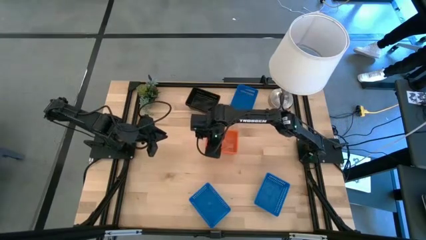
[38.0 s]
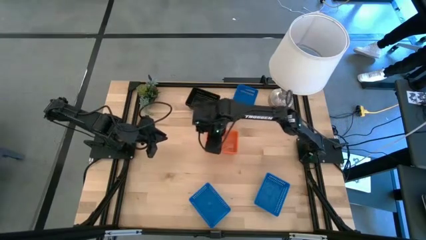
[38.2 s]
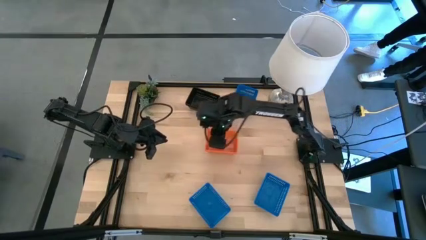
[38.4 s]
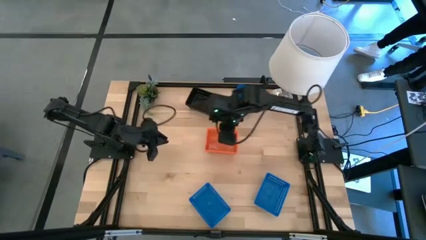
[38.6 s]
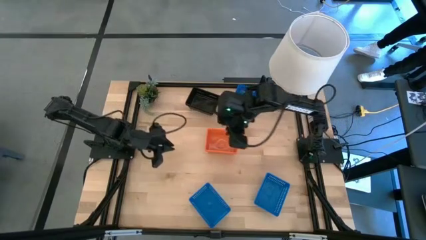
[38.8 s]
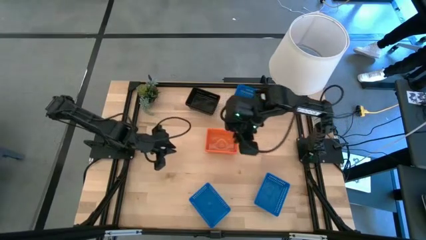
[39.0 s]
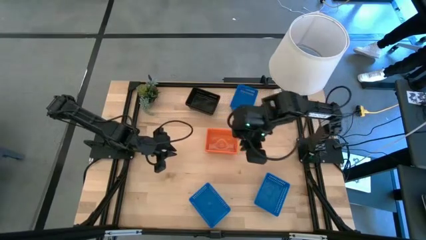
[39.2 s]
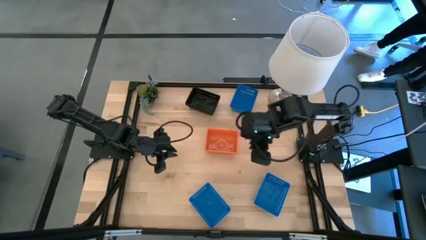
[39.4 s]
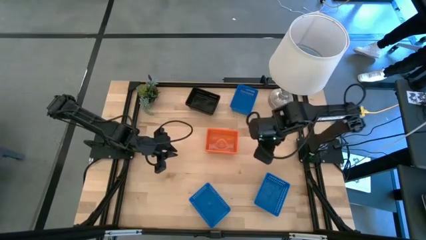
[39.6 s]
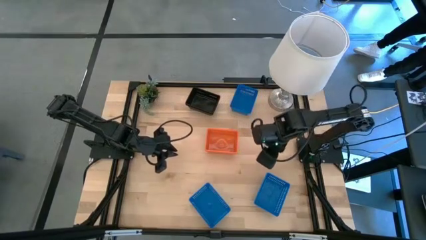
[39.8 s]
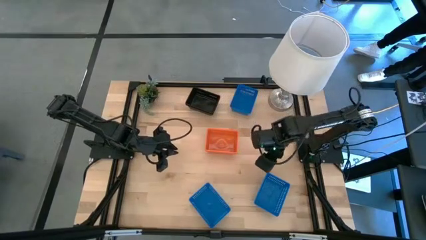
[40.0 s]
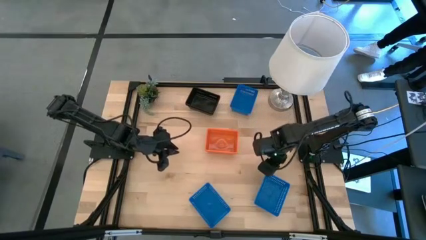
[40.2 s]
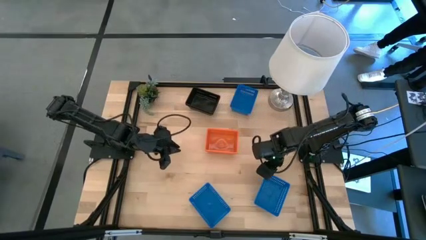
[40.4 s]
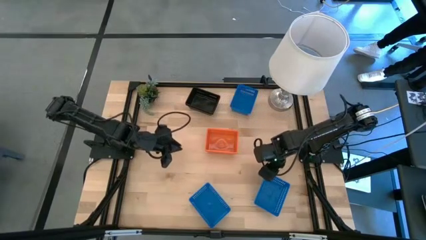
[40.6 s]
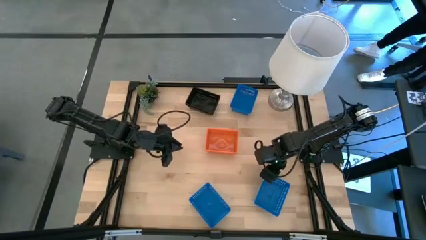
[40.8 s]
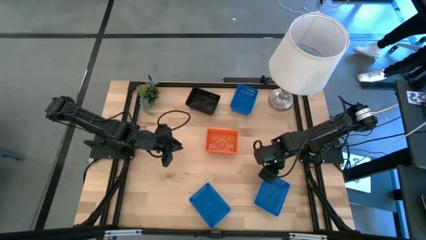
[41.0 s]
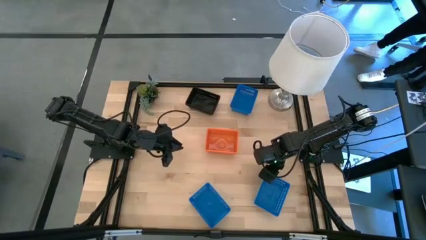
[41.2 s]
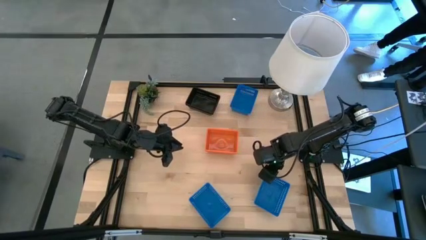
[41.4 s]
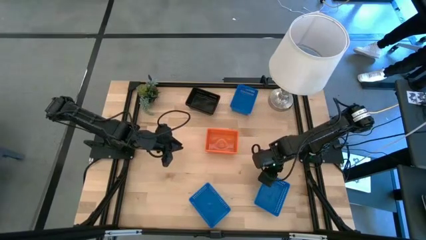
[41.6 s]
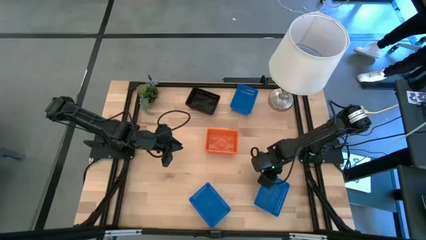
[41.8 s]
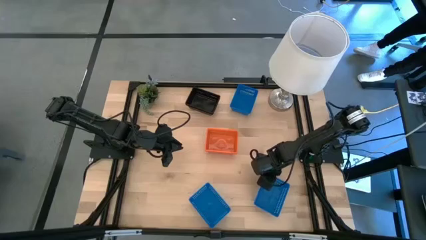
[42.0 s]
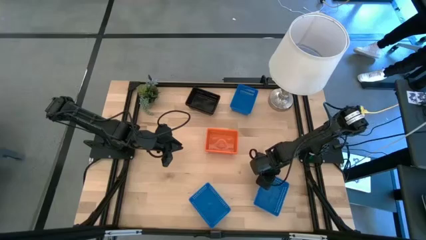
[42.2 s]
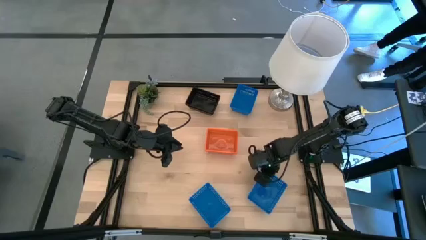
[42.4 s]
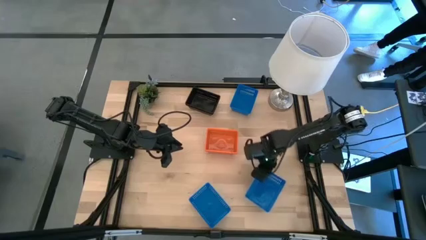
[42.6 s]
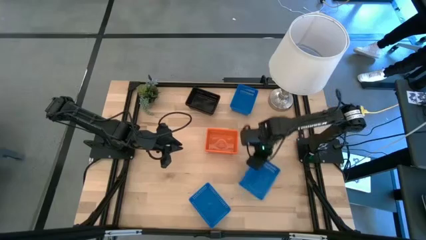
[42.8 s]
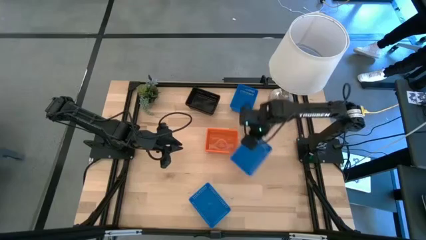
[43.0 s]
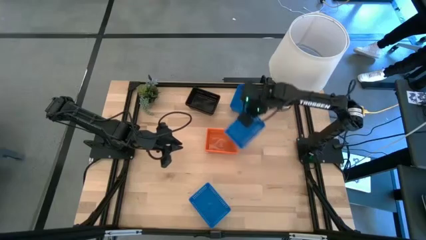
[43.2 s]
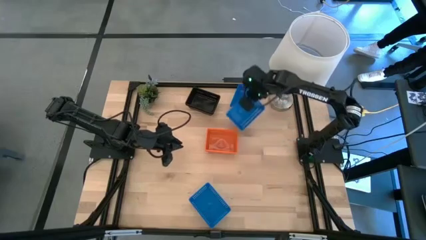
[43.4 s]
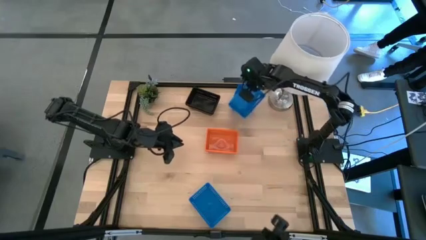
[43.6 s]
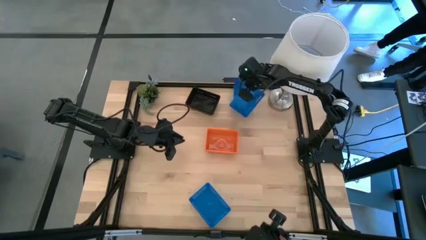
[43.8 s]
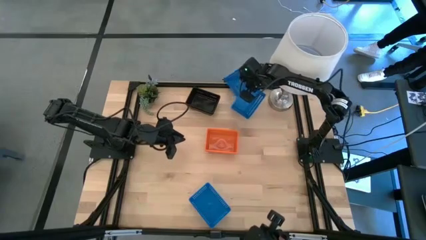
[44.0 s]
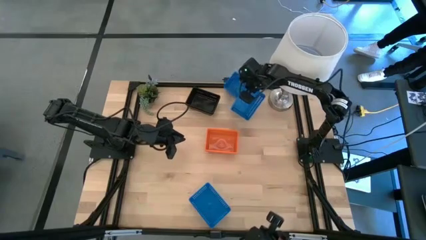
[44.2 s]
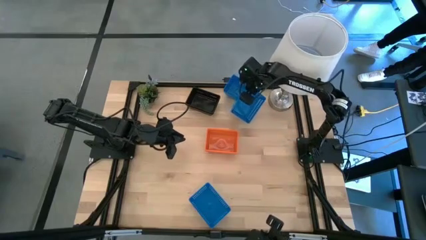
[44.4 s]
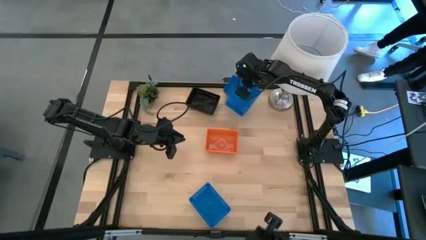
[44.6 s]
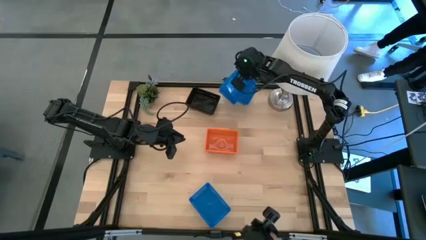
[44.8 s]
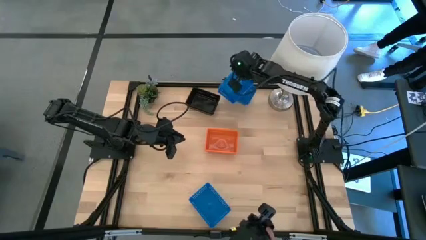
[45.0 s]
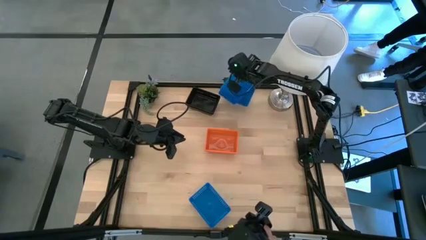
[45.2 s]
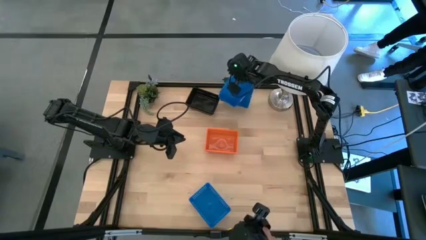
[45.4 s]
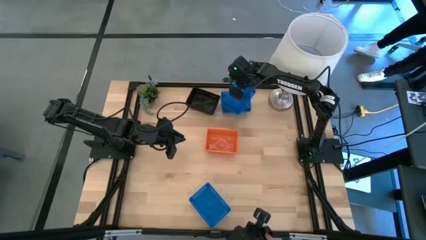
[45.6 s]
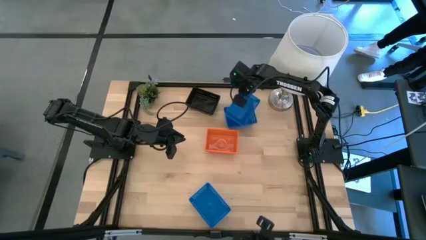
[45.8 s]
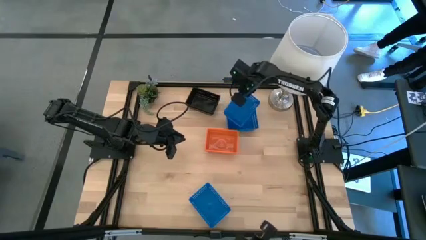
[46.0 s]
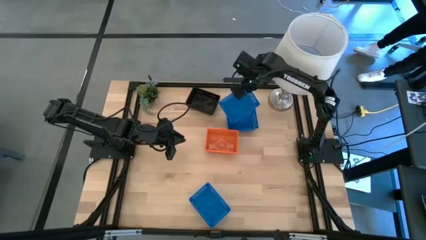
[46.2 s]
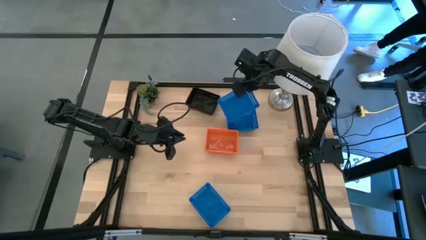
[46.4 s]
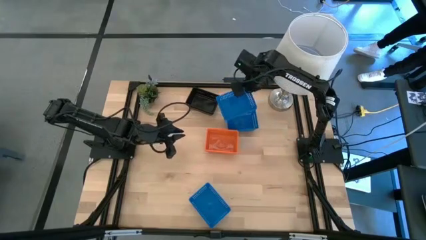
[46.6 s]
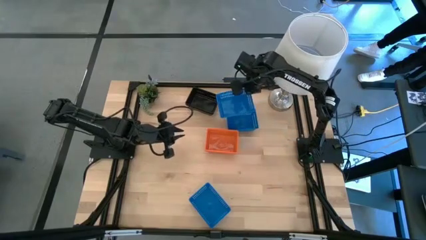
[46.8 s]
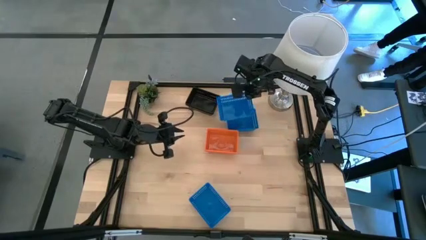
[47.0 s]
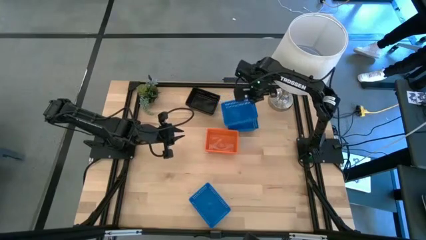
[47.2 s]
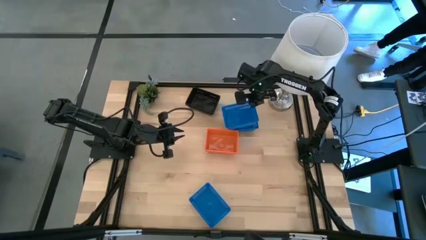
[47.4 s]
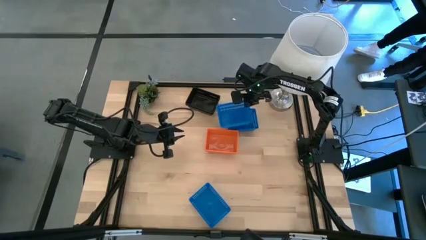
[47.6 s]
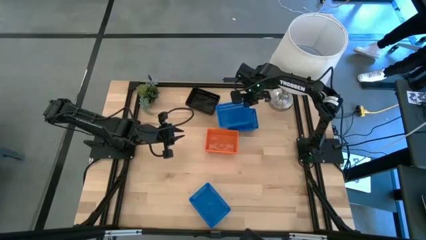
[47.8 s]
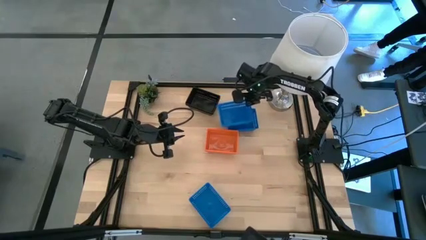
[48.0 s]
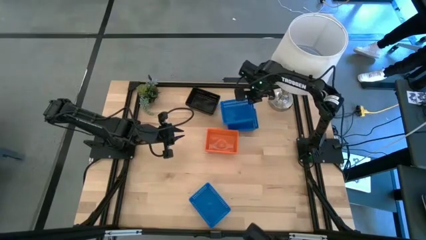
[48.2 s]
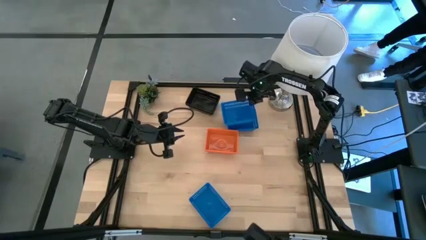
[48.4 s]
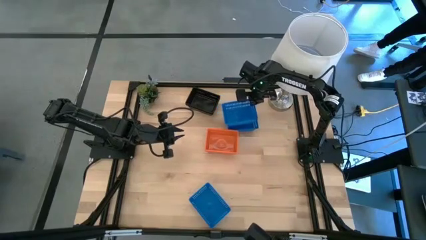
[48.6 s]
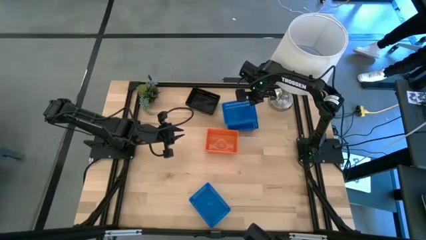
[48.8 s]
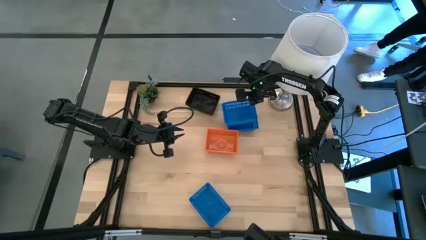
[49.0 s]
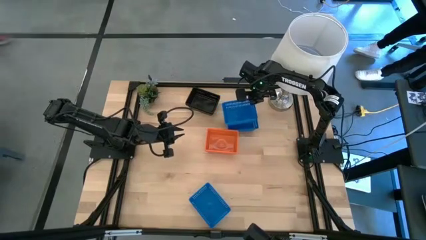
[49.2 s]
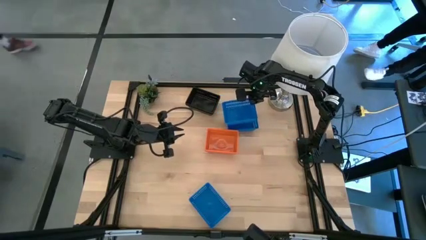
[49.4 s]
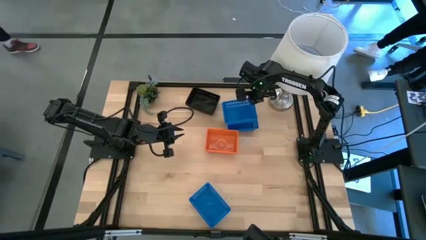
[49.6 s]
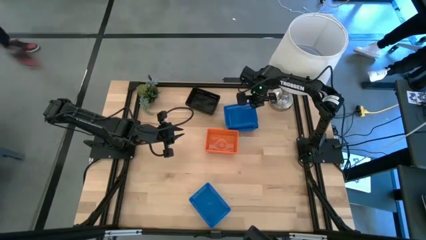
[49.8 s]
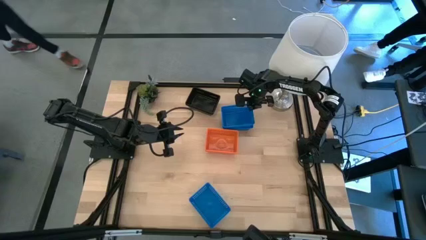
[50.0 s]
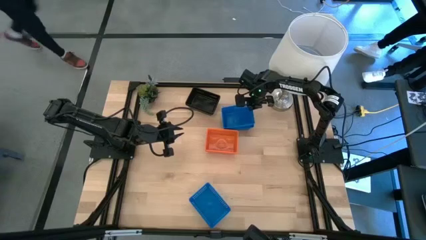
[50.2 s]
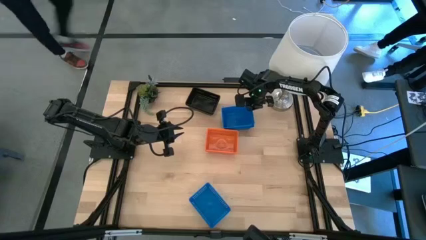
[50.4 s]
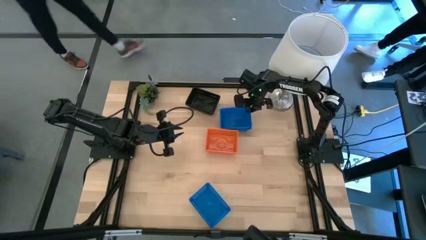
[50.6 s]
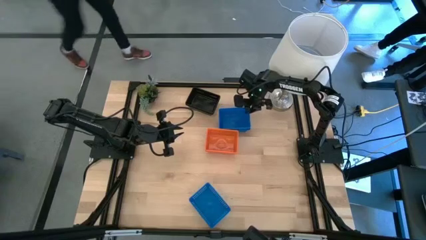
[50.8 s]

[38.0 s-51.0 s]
Stack the bottom right blue bin on the top blue bin

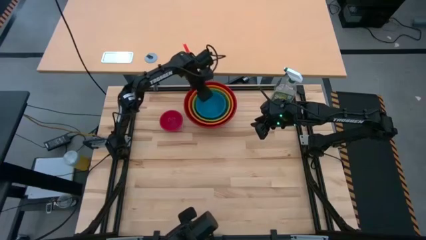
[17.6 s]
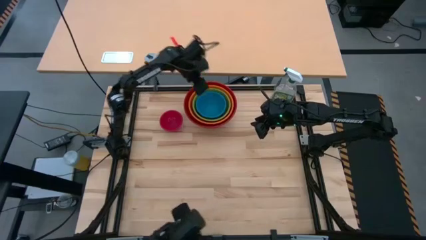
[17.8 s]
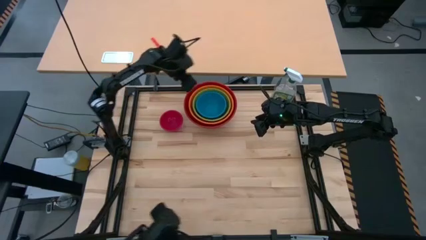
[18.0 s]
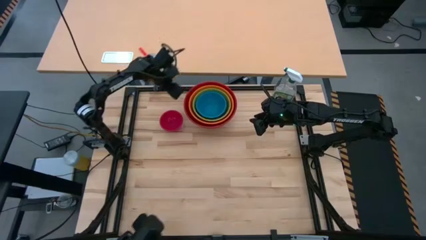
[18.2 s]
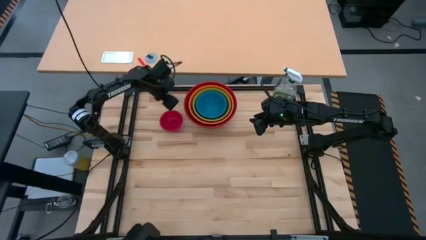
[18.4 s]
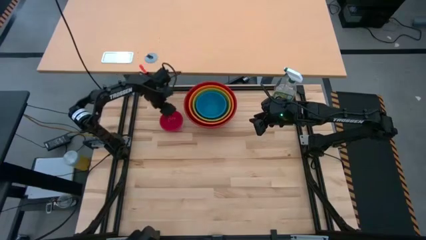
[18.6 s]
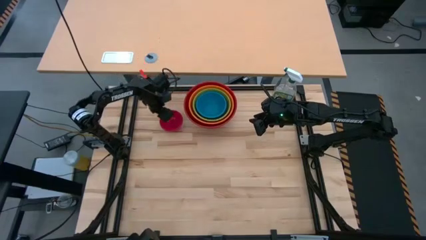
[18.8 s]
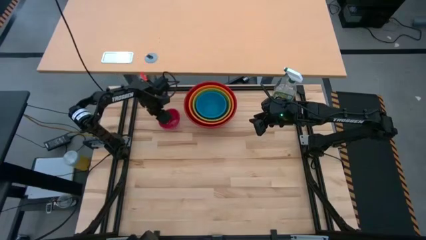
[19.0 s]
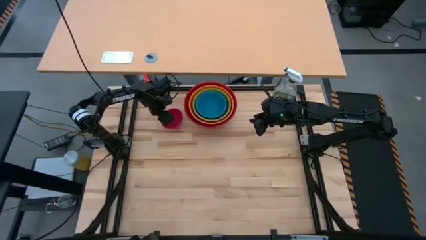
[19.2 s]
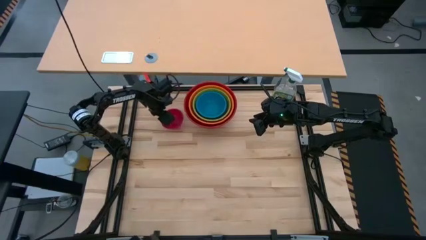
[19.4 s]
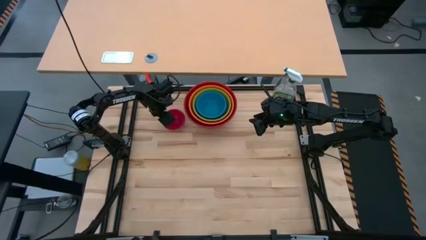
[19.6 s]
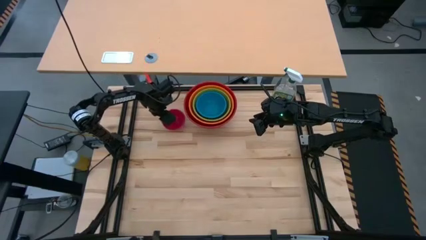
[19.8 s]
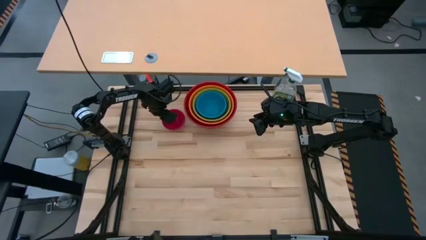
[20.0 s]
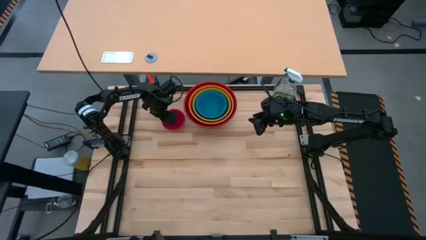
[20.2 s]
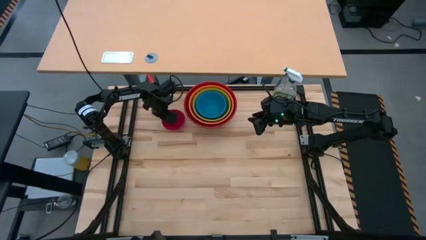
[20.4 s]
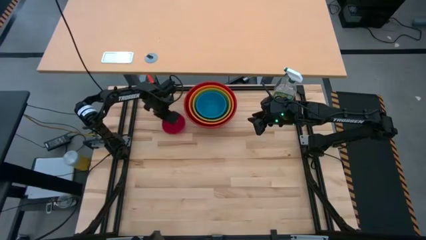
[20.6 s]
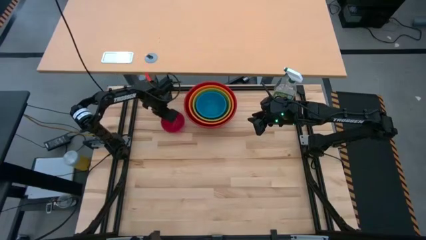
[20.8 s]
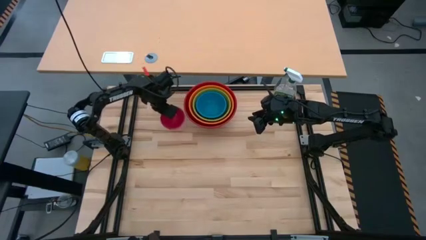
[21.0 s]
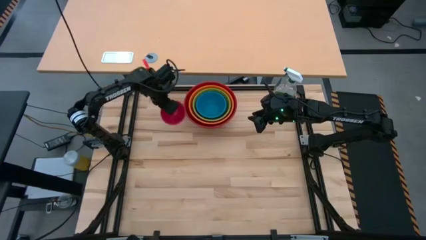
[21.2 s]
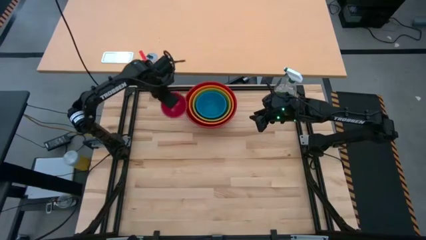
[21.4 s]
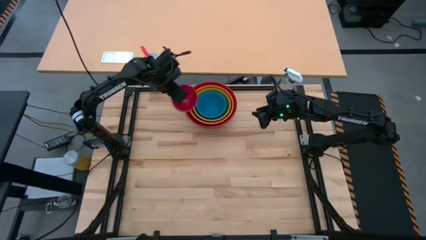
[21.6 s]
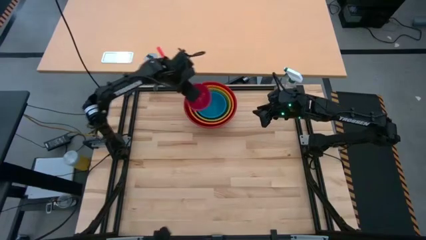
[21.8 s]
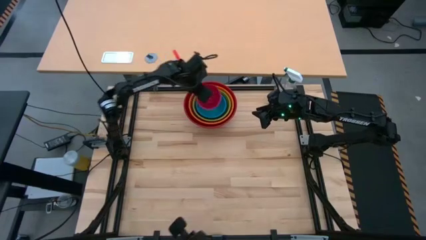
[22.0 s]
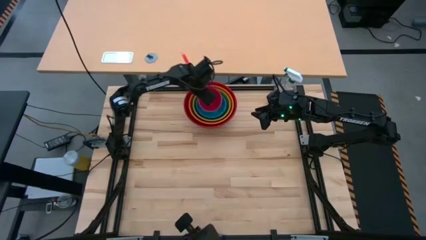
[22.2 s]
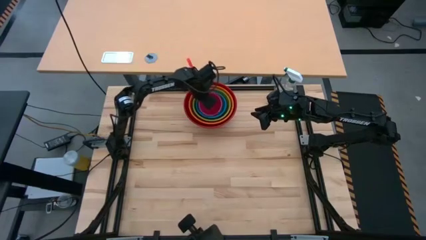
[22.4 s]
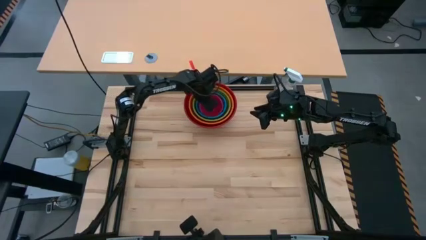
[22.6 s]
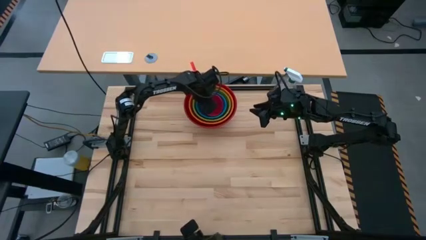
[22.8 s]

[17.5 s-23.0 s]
Stack the red bowl on top of the blue bowl
